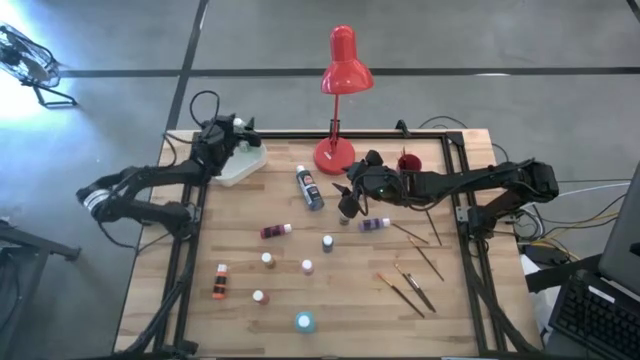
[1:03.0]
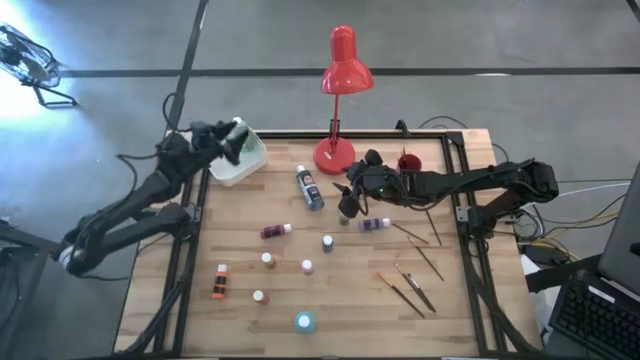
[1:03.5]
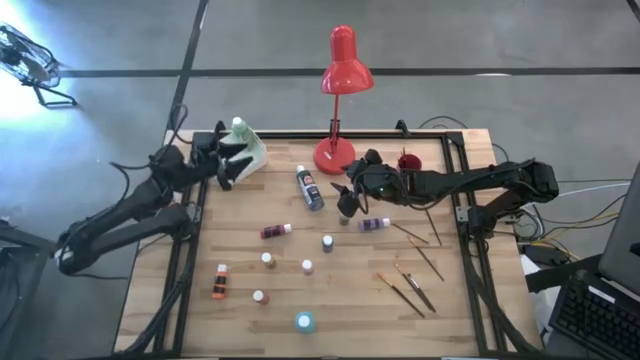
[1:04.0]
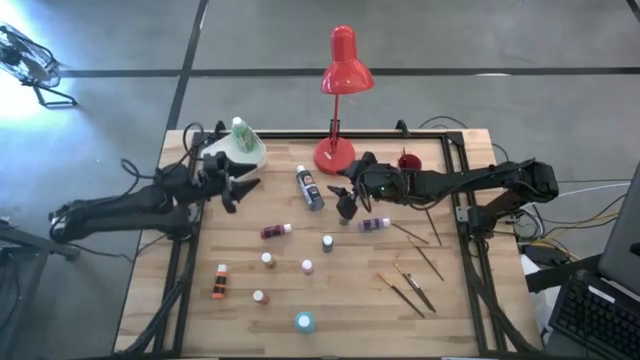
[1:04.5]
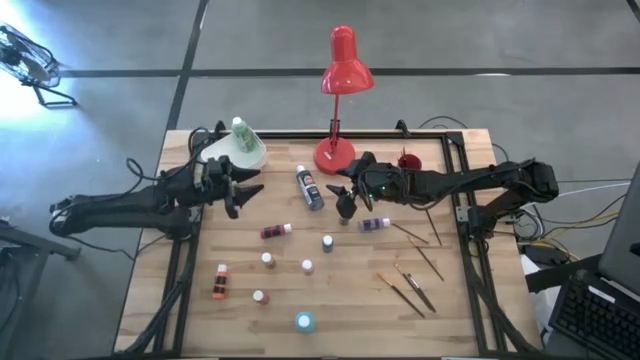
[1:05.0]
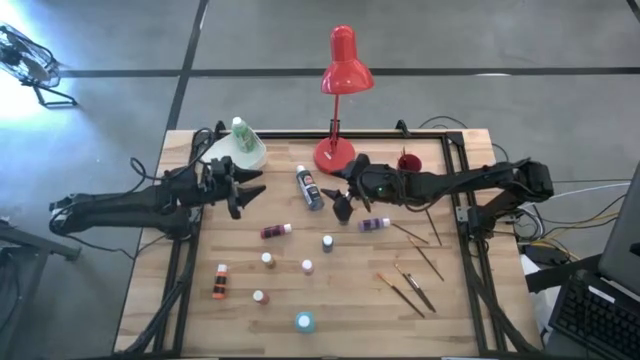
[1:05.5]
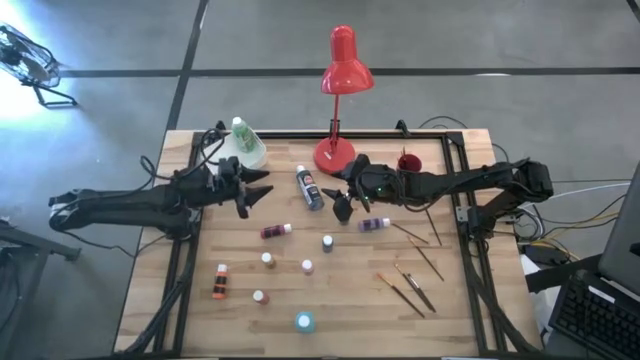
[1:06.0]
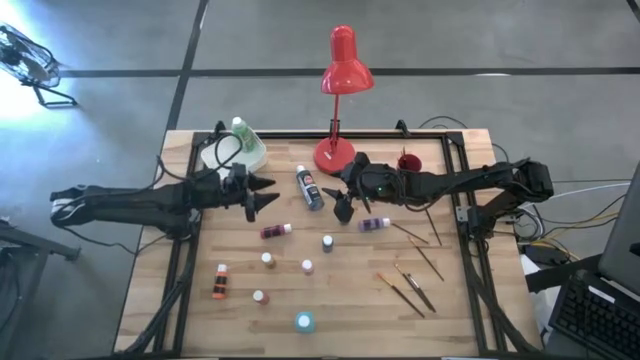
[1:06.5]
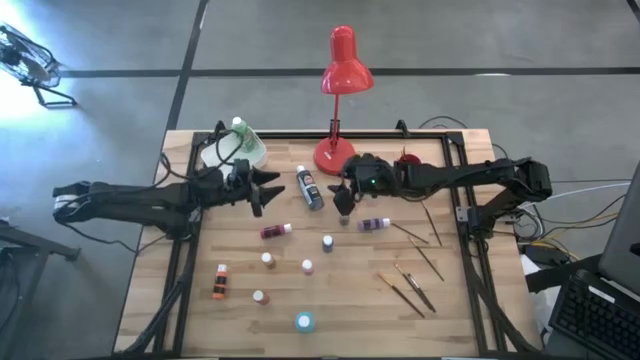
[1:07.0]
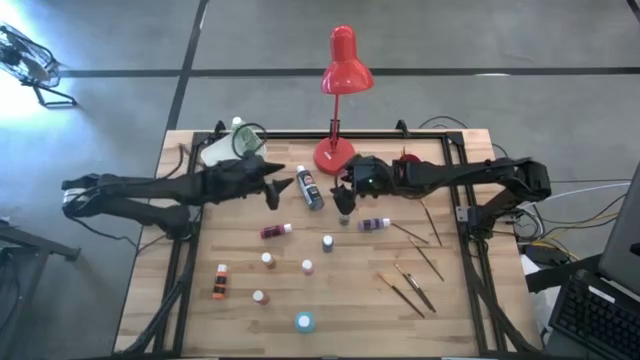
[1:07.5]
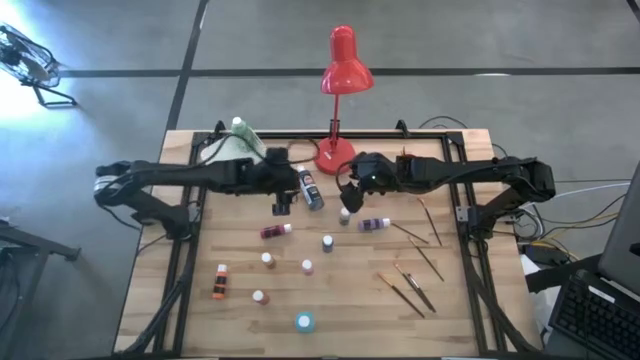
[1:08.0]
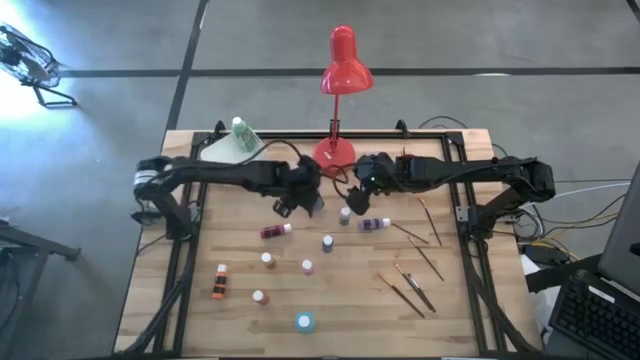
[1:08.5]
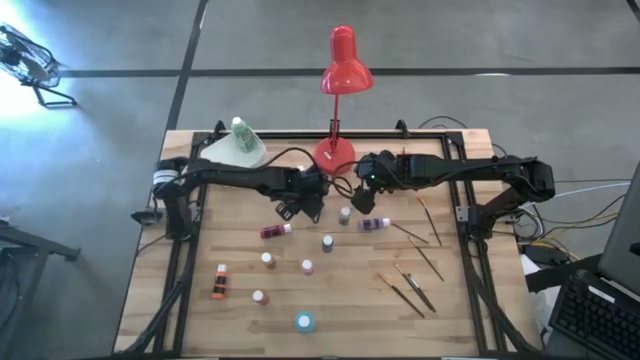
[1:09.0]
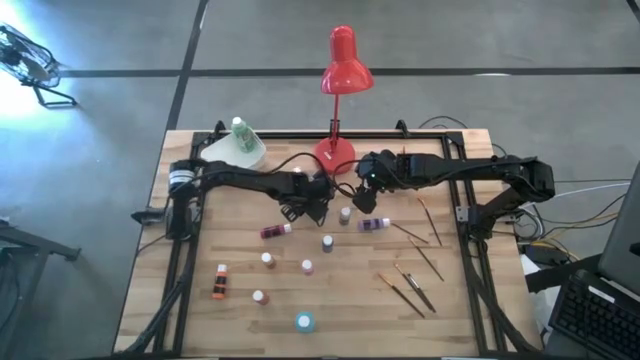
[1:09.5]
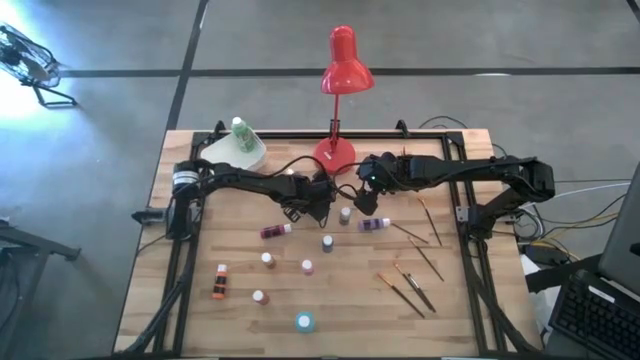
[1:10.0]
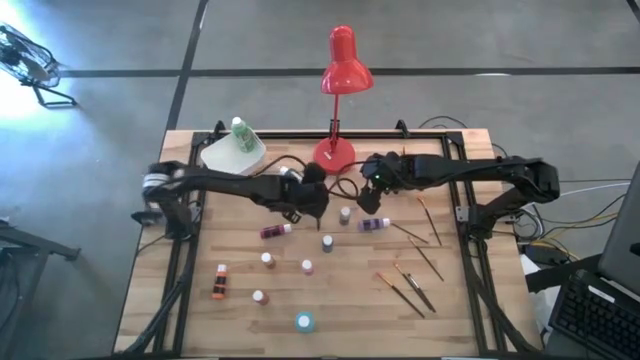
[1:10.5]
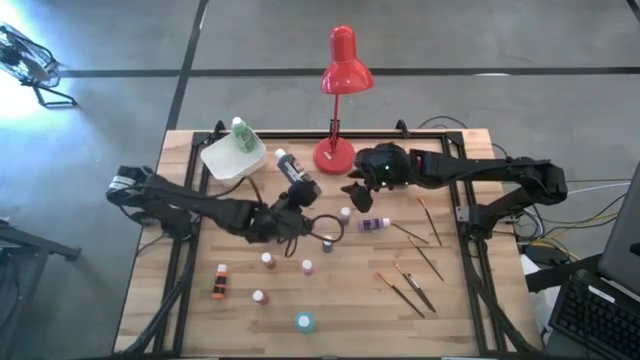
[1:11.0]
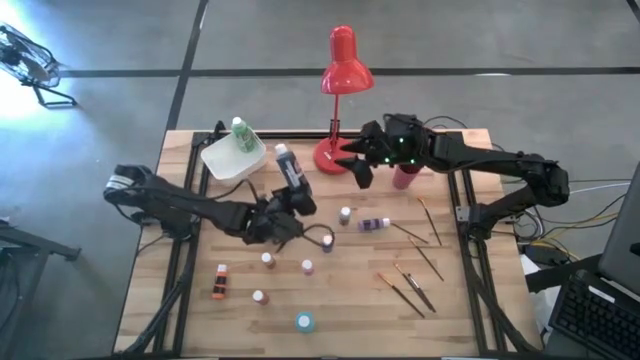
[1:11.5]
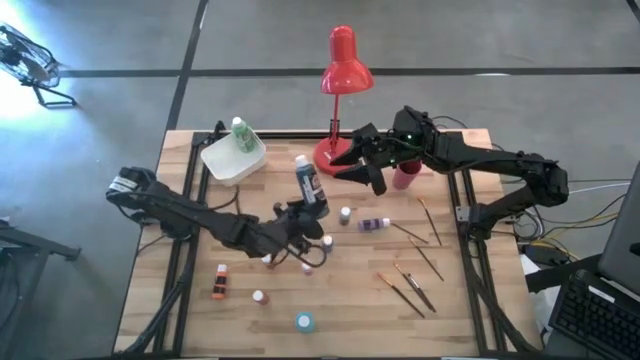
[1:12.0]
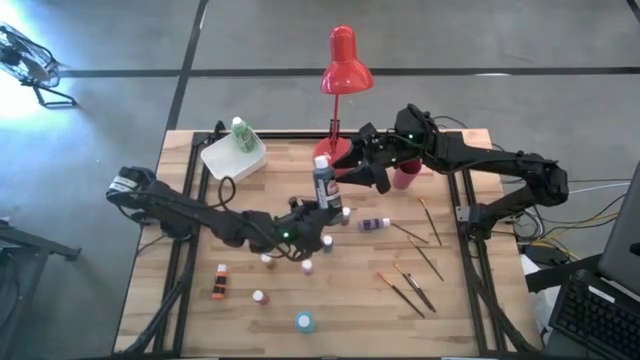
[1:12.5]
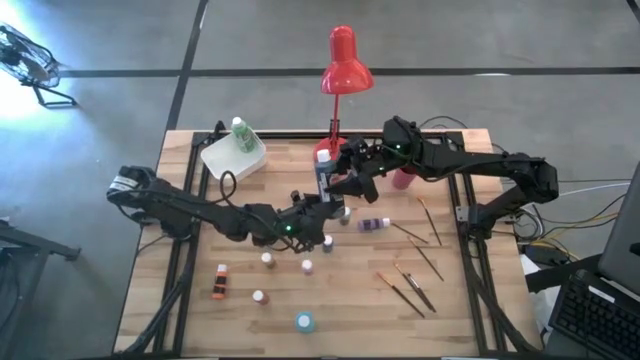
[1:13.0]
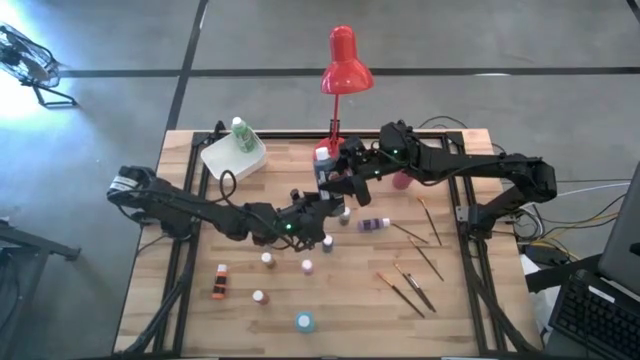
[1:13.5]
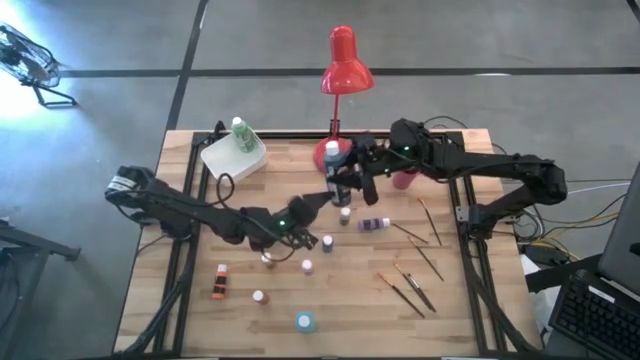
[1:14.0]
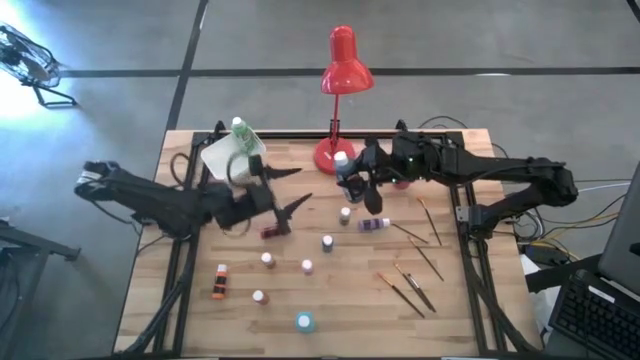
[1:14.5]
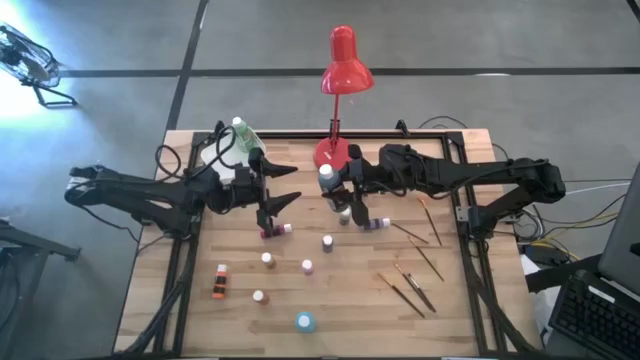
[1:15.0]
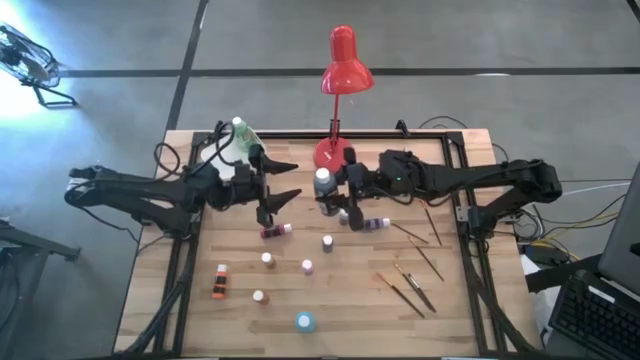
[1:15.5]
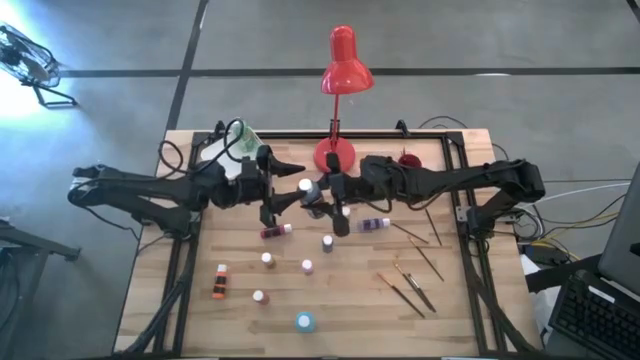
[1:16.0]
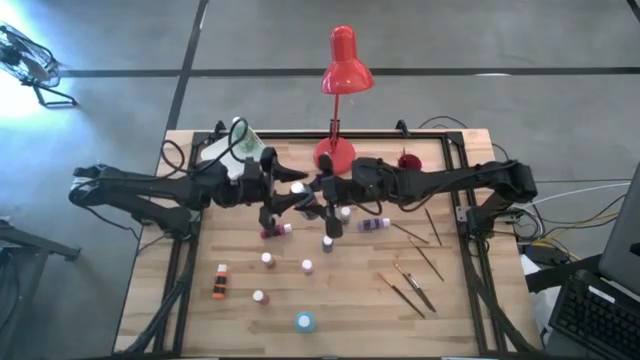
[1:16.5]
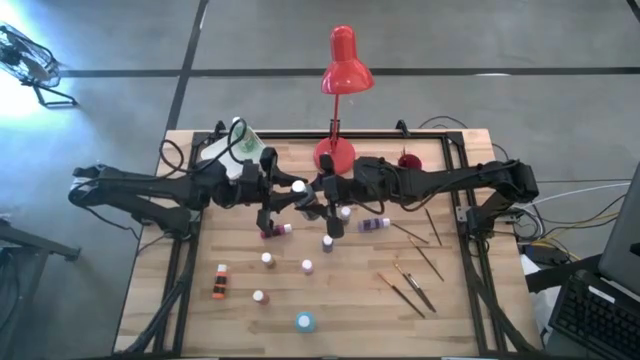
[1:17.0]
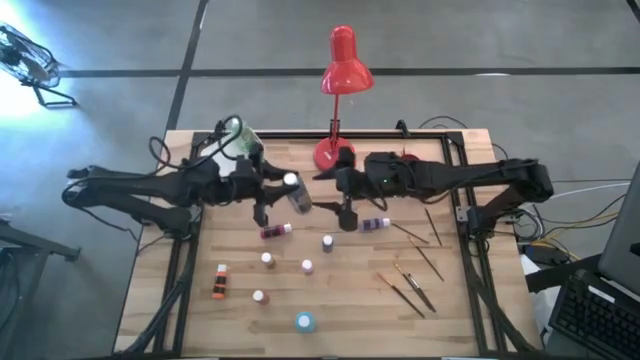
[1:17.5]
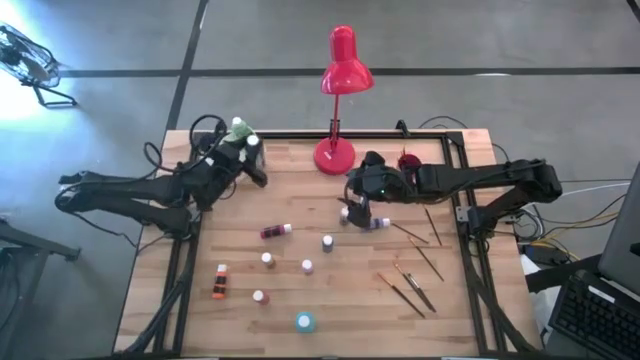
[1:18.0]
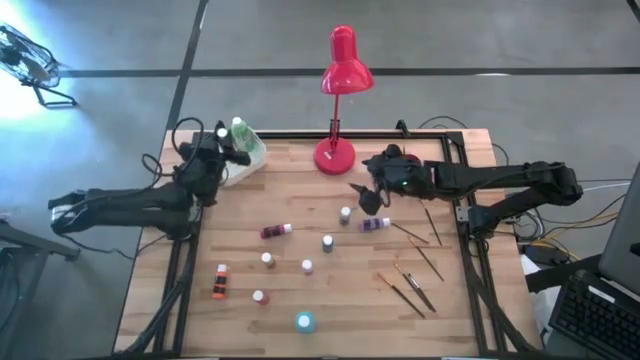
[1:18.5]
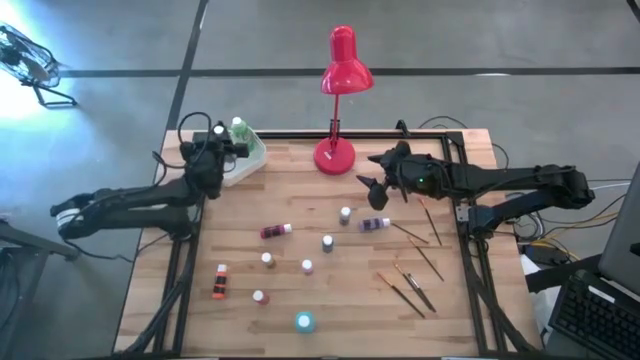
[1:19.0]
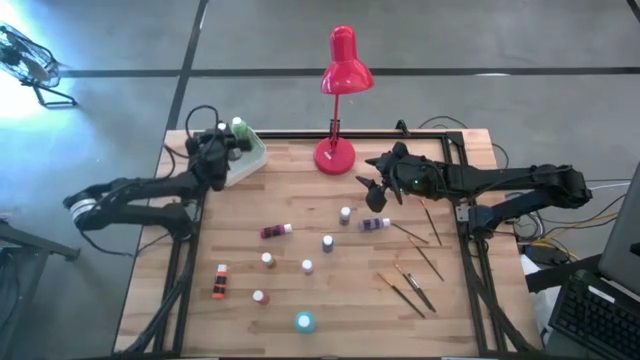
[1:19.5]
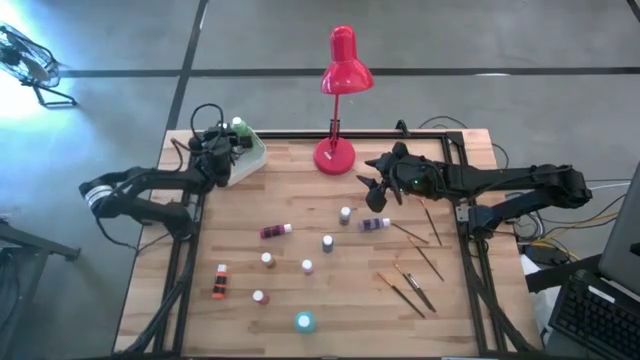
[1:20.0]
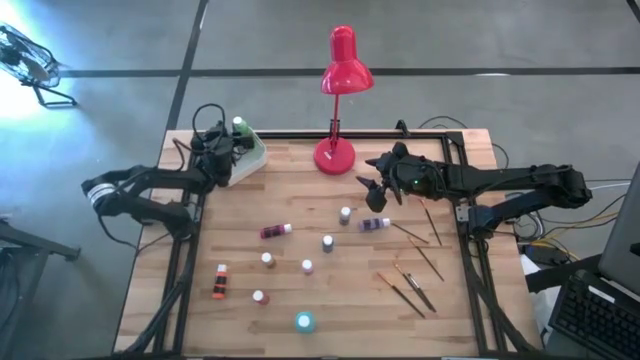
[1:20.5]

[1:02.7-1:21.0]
Task: Pick & Place Paint Supplies
Put the black paint bottle into the white bin
